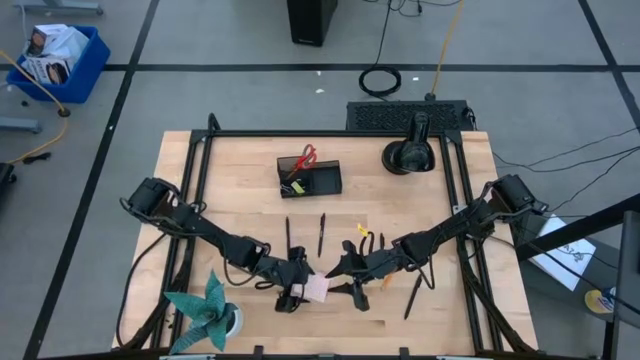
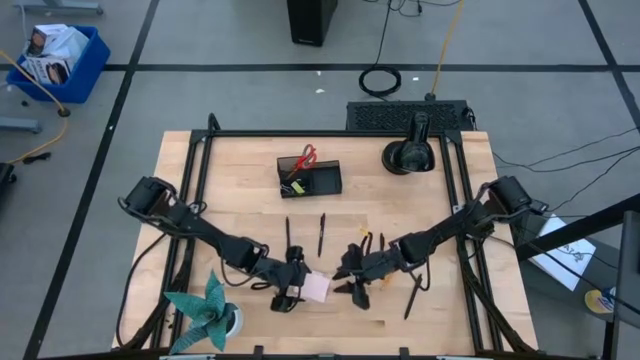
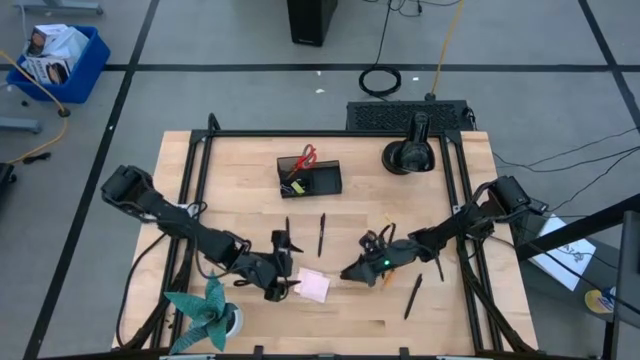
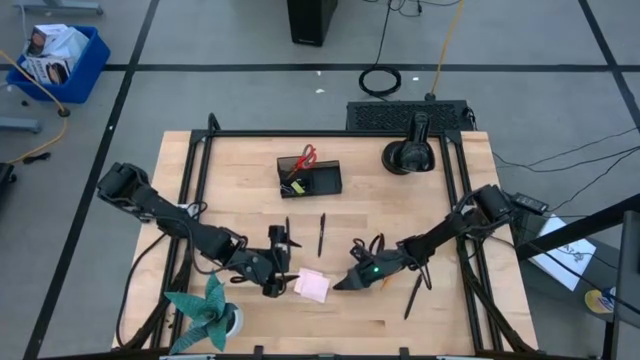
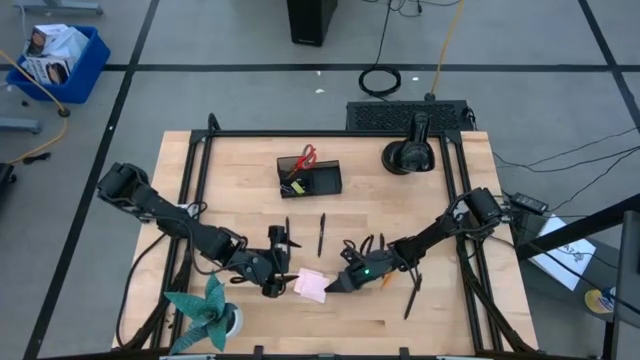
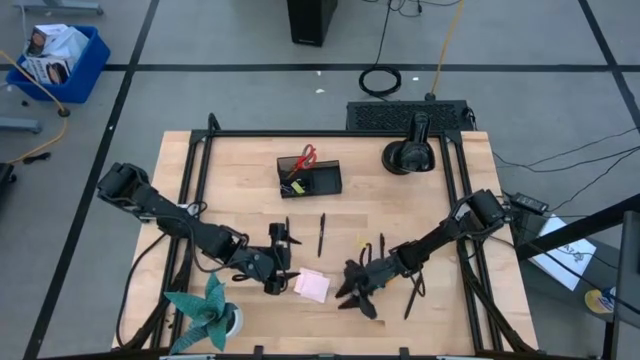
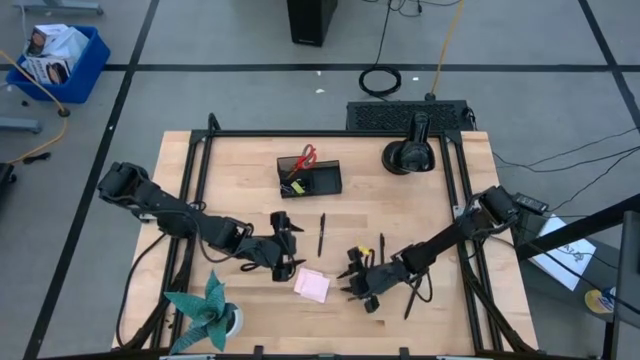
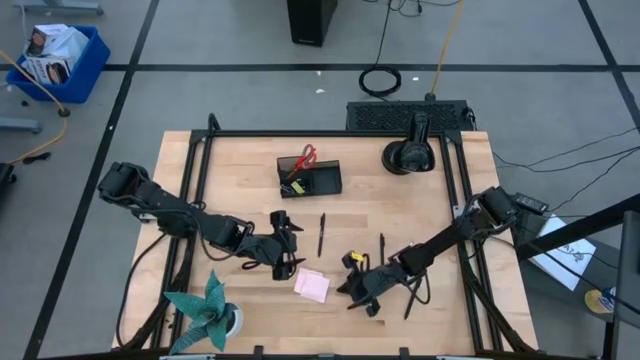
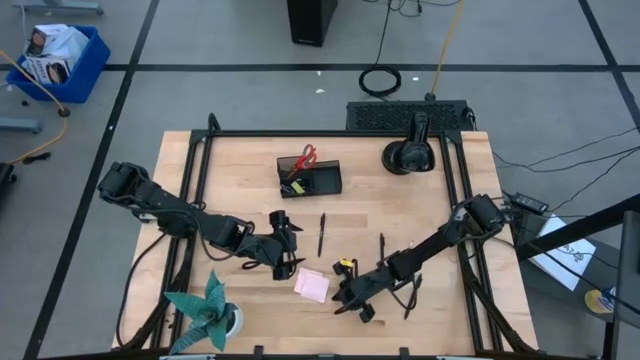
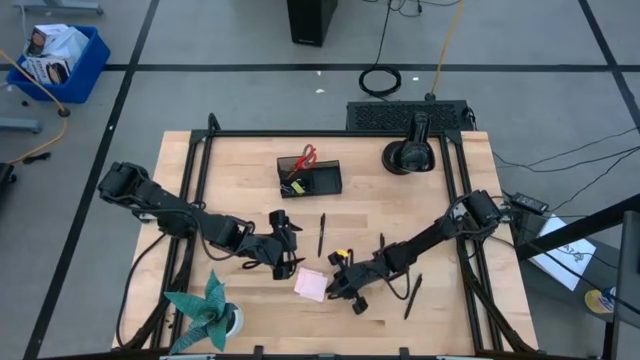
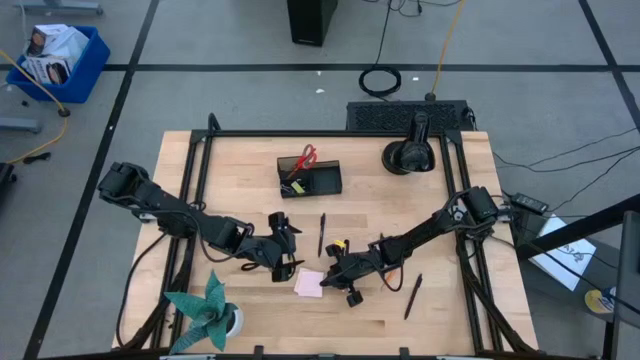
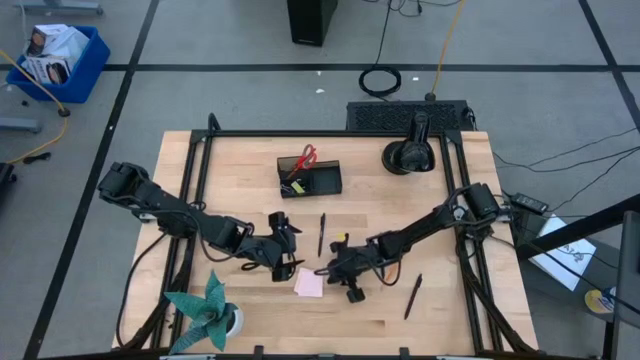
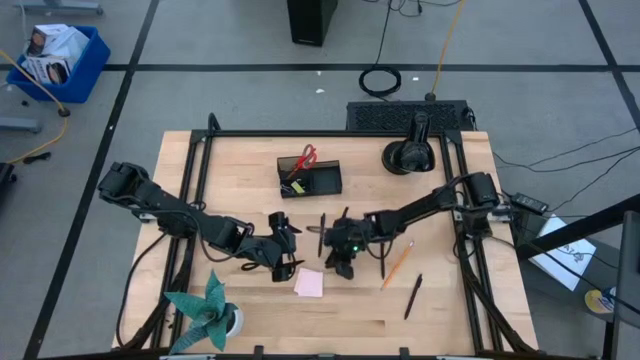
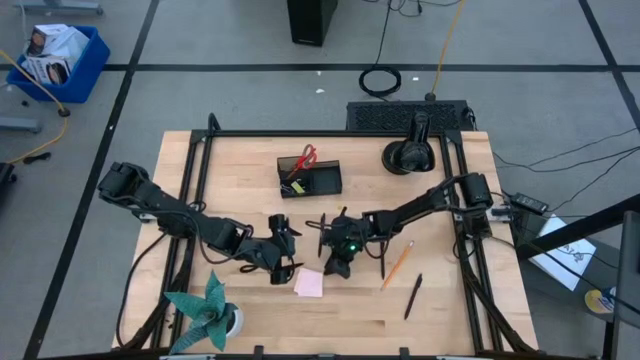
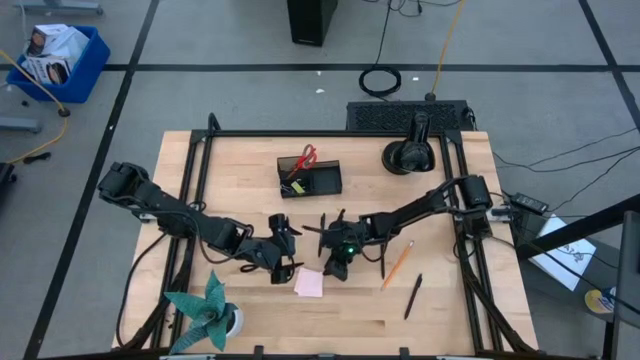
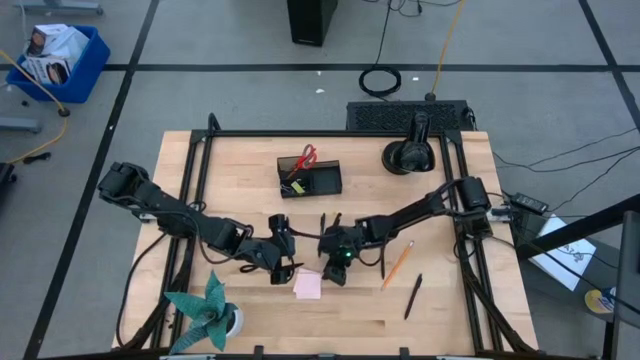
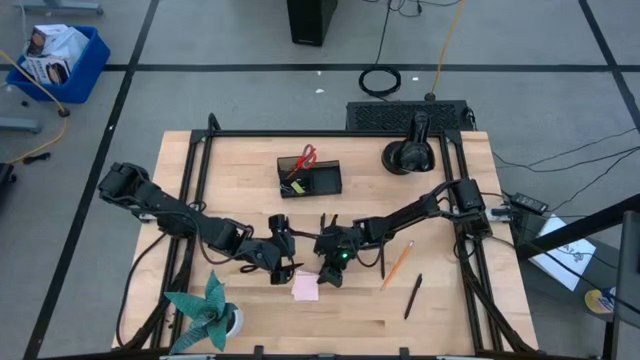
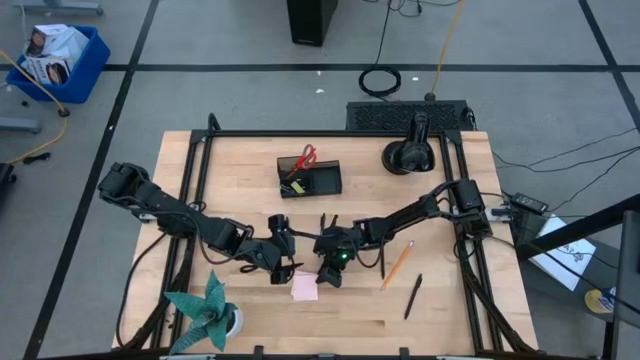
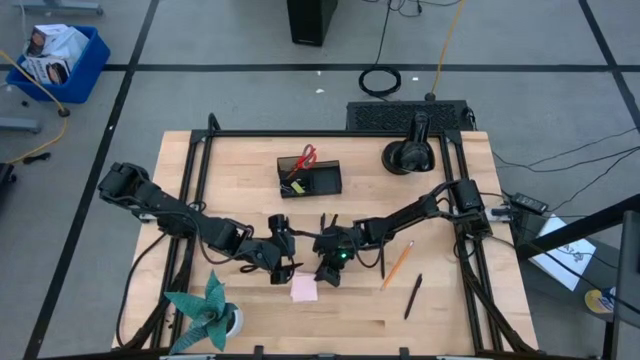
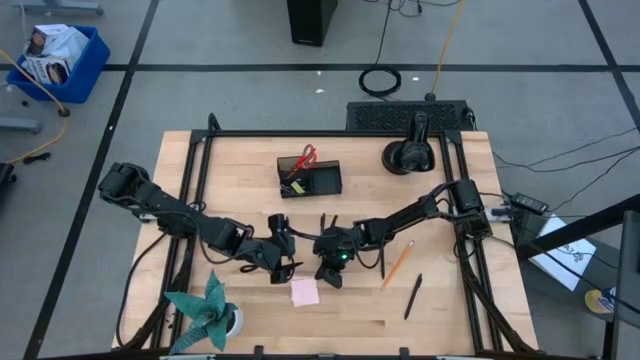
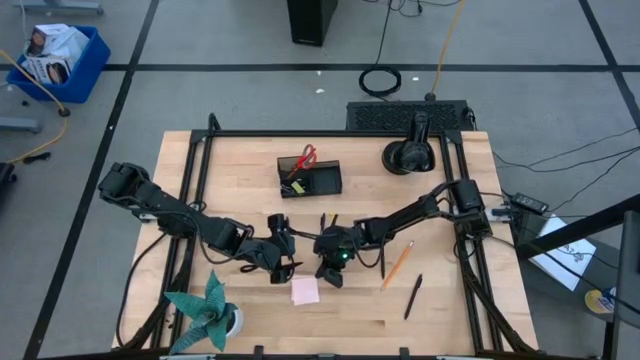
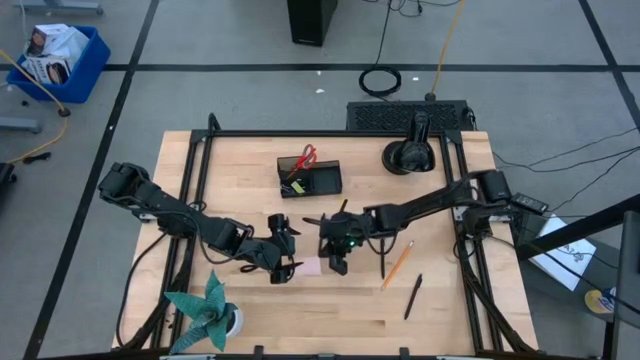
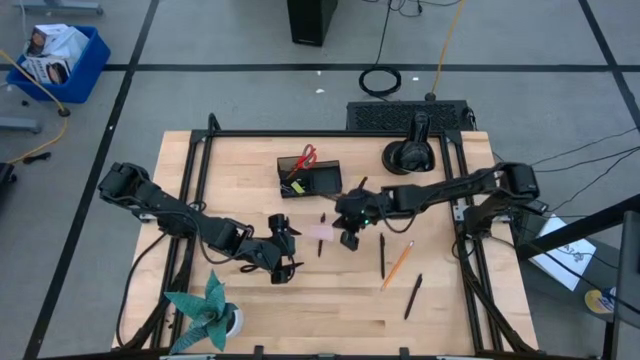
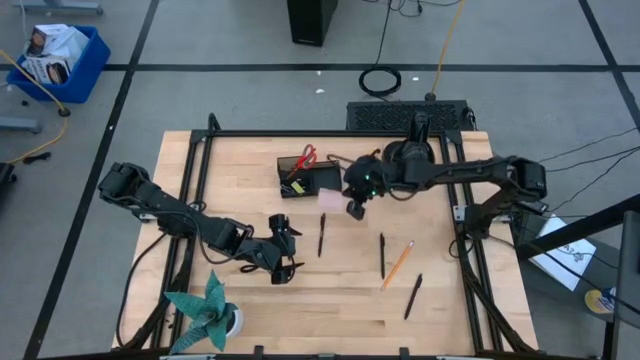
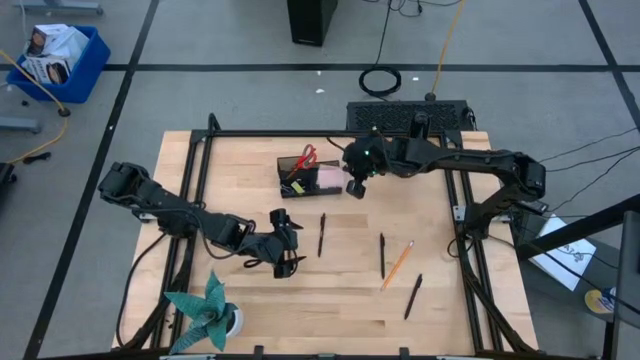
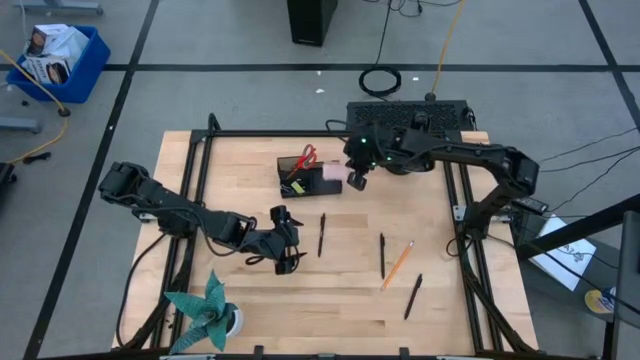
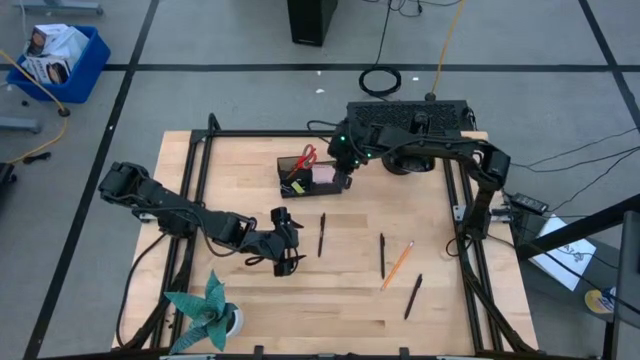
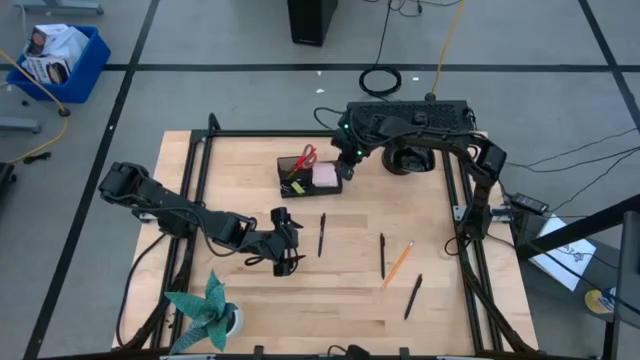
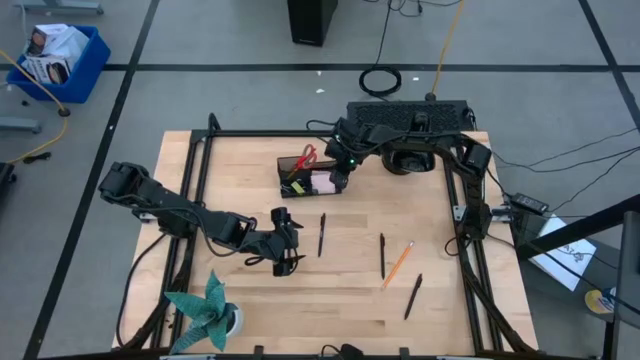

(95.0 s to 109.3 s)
Task: Pick and place office supplies into organizer
Put the pink sticky notes into the black desk organizer
